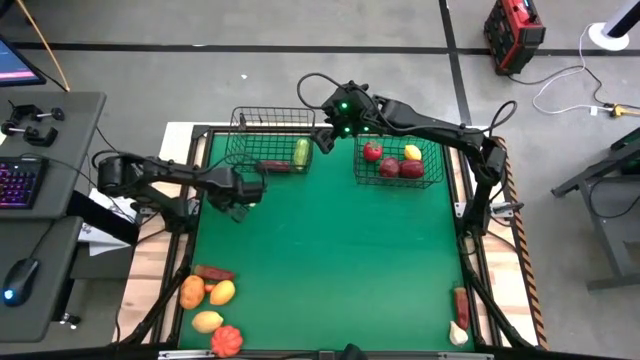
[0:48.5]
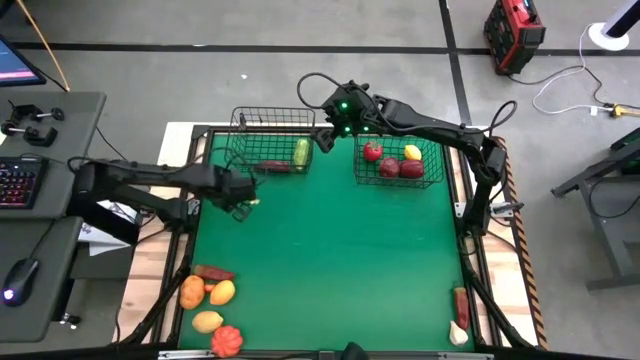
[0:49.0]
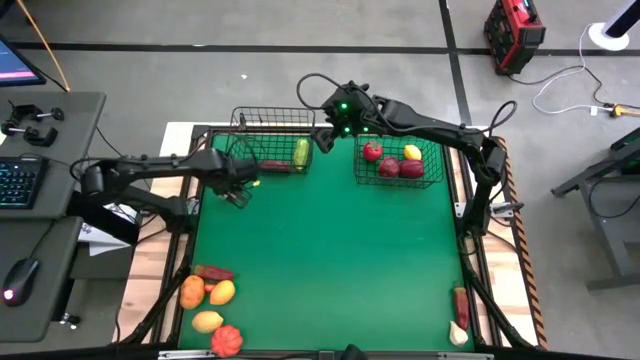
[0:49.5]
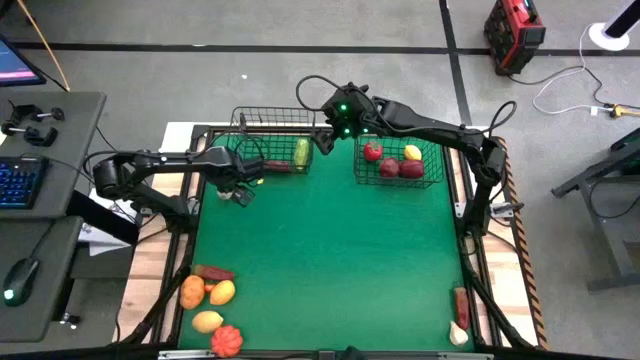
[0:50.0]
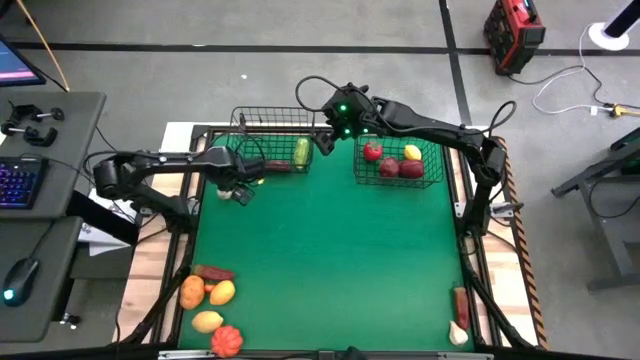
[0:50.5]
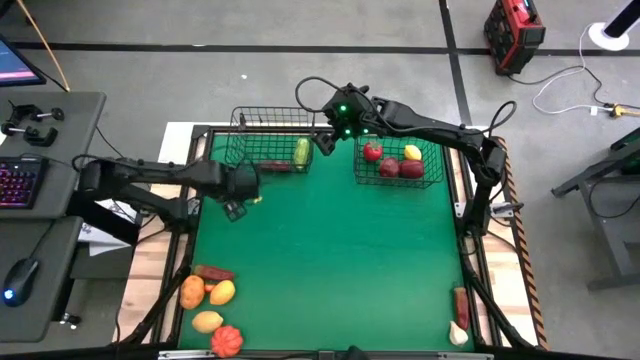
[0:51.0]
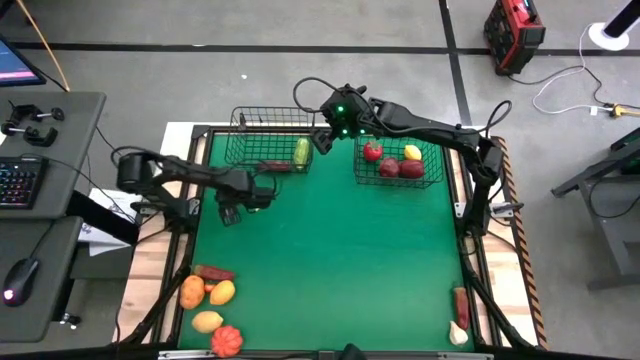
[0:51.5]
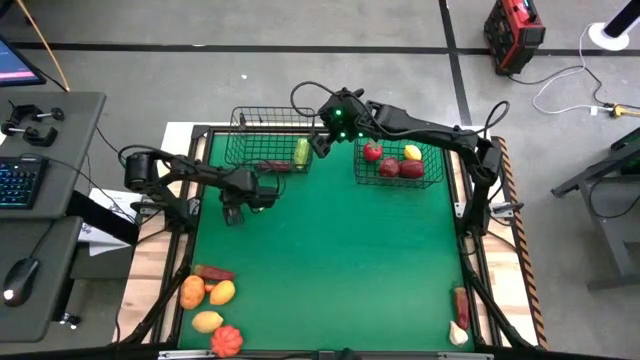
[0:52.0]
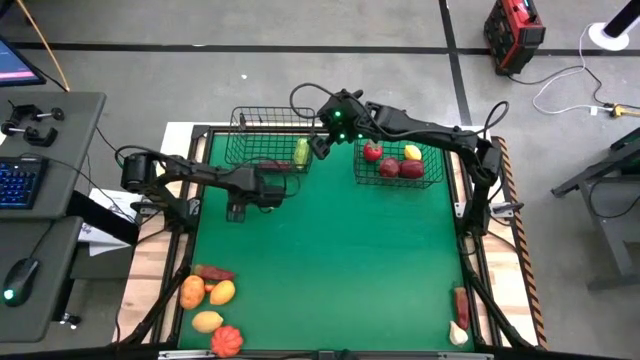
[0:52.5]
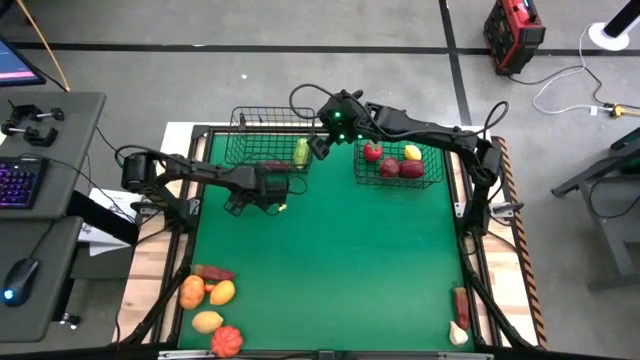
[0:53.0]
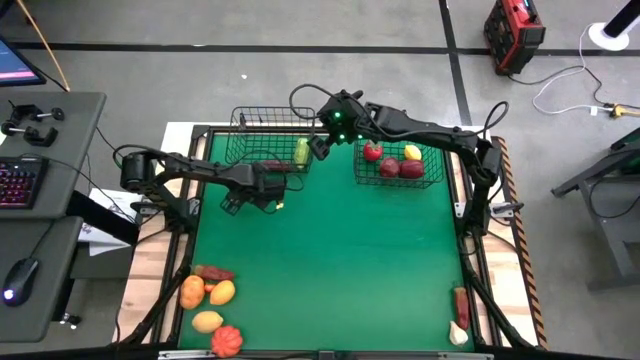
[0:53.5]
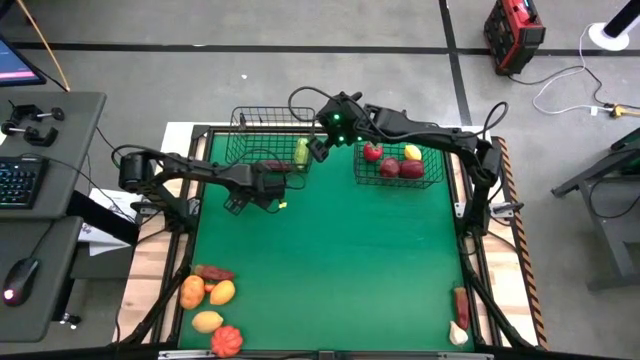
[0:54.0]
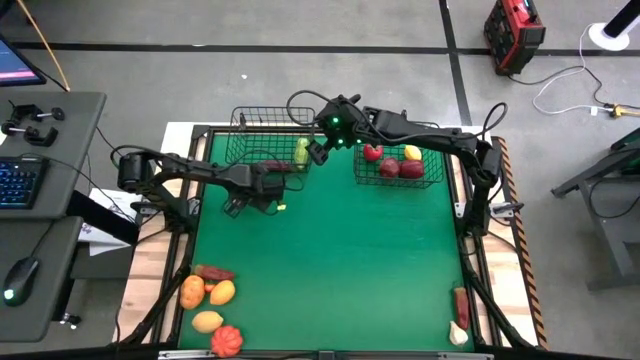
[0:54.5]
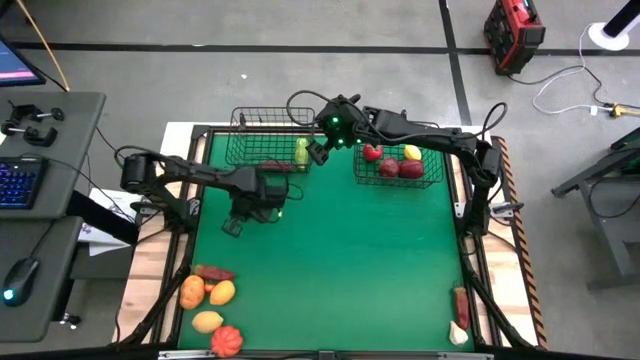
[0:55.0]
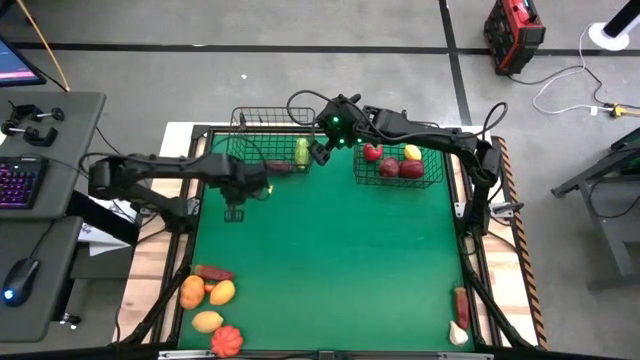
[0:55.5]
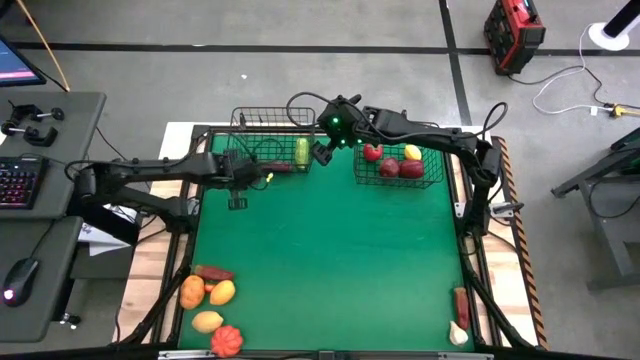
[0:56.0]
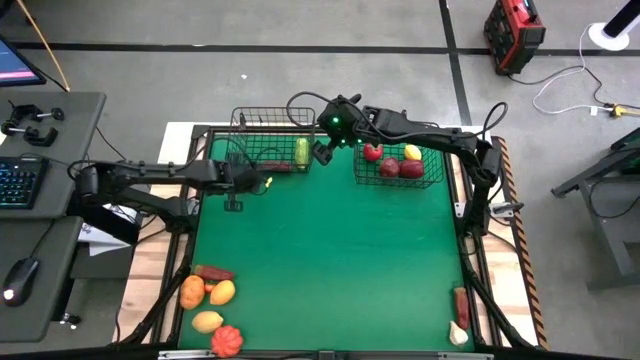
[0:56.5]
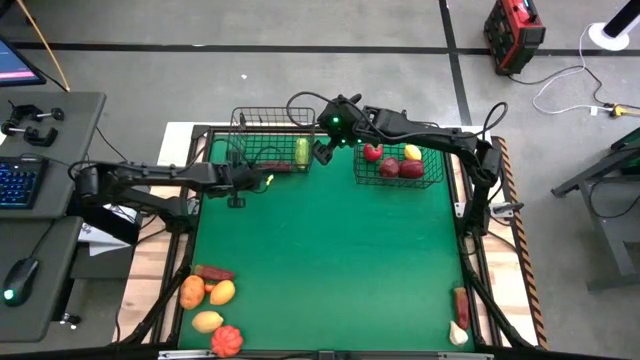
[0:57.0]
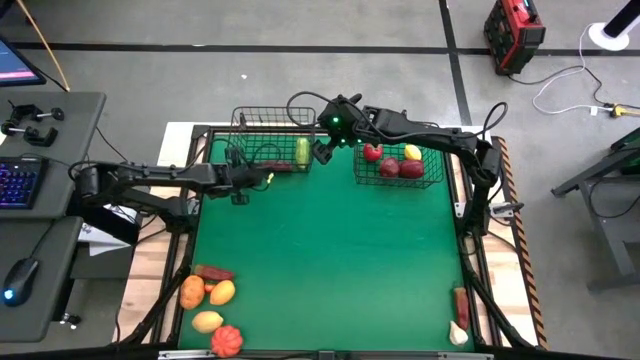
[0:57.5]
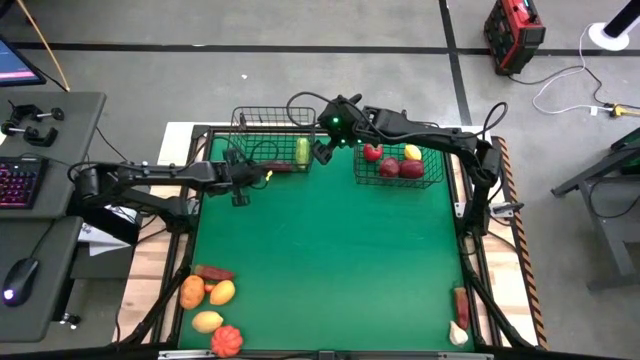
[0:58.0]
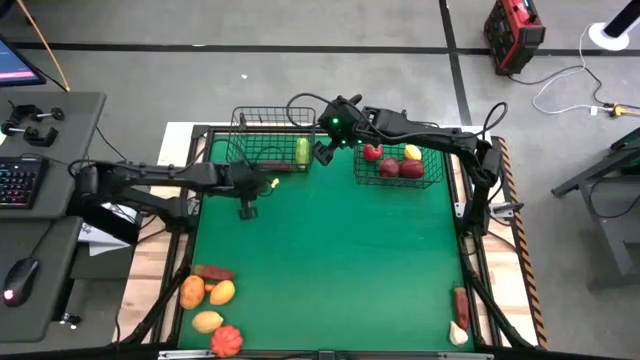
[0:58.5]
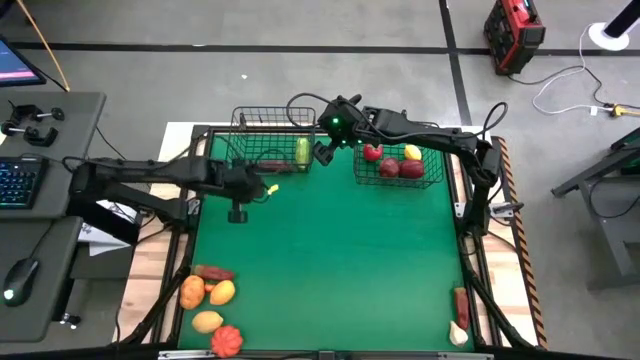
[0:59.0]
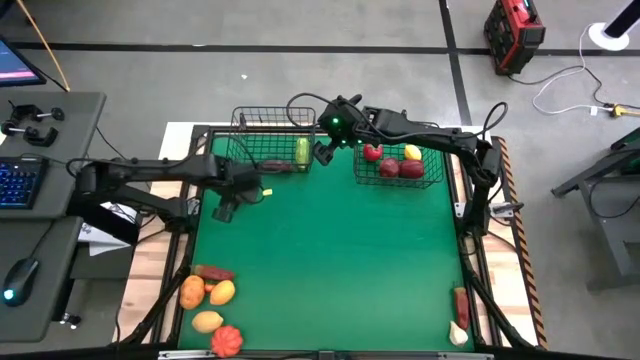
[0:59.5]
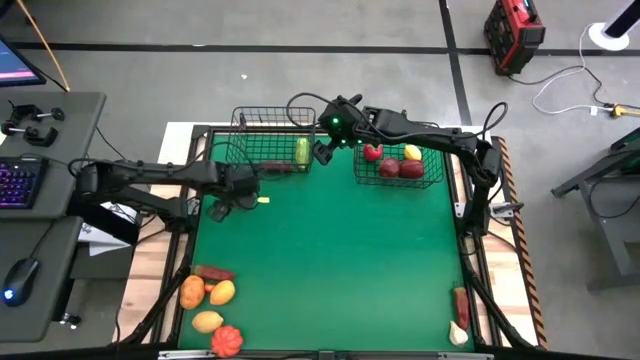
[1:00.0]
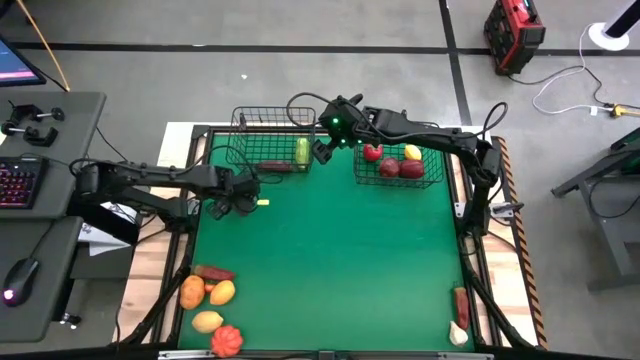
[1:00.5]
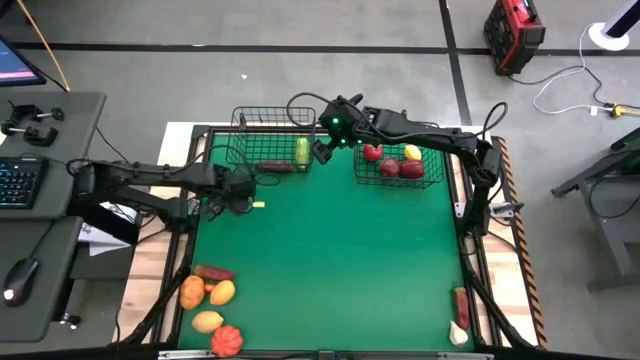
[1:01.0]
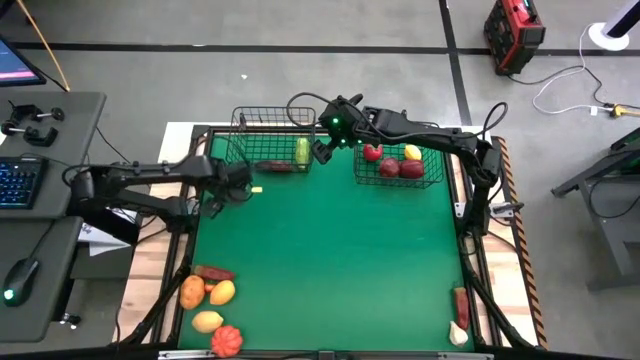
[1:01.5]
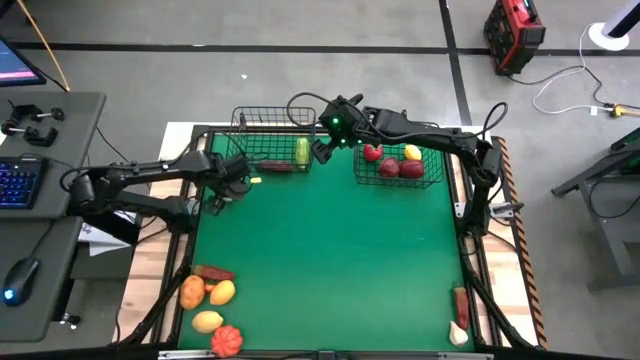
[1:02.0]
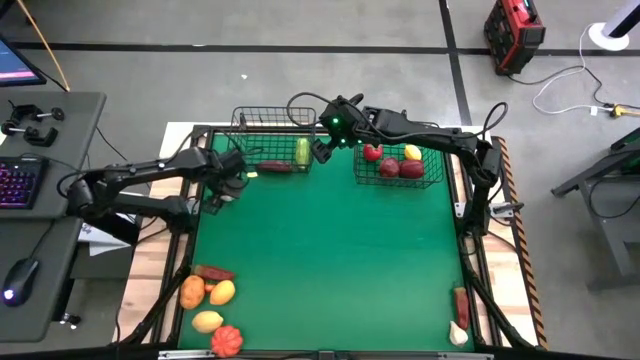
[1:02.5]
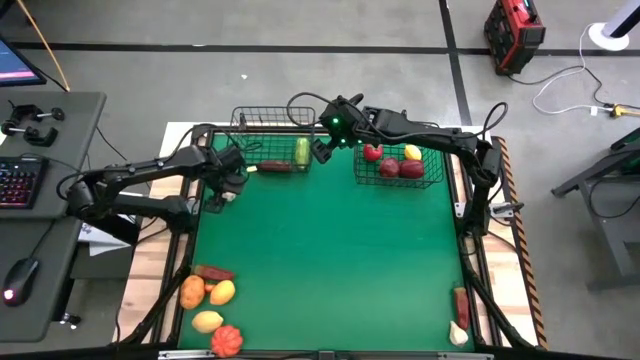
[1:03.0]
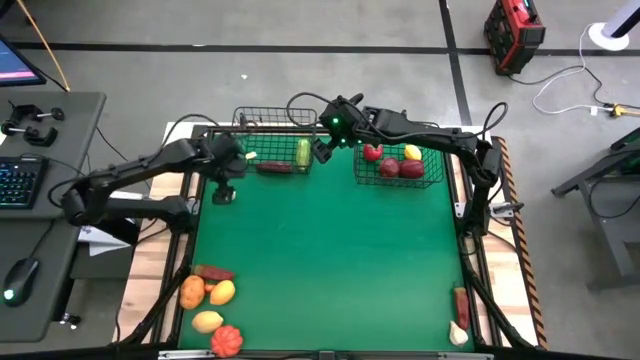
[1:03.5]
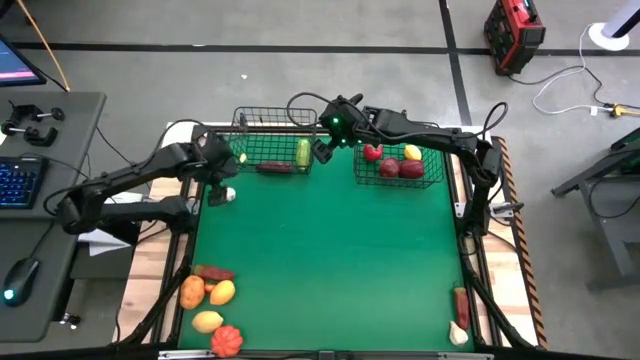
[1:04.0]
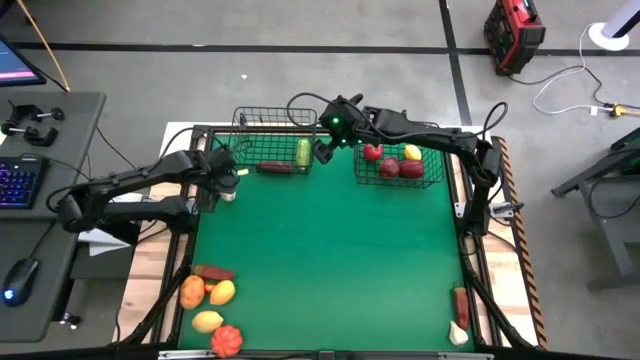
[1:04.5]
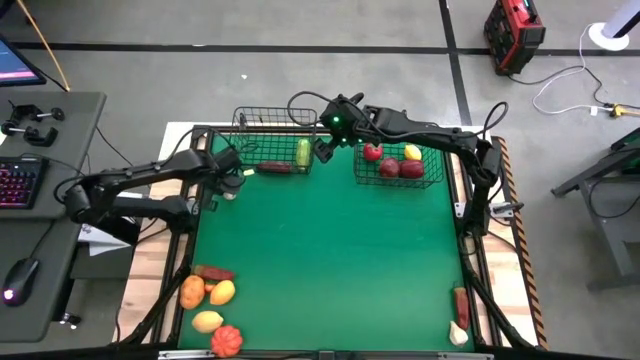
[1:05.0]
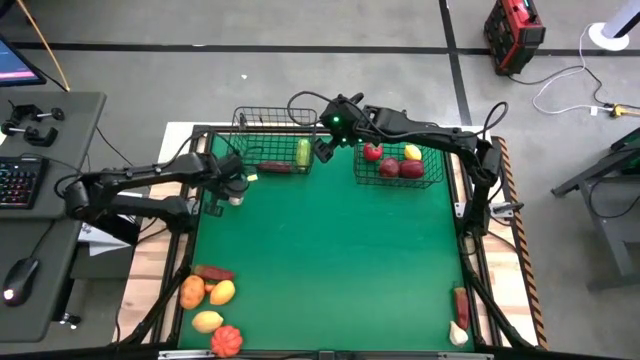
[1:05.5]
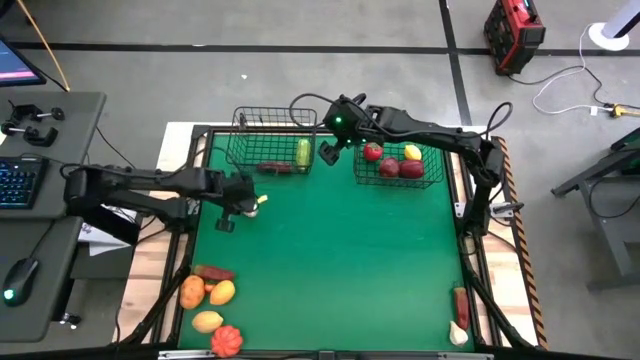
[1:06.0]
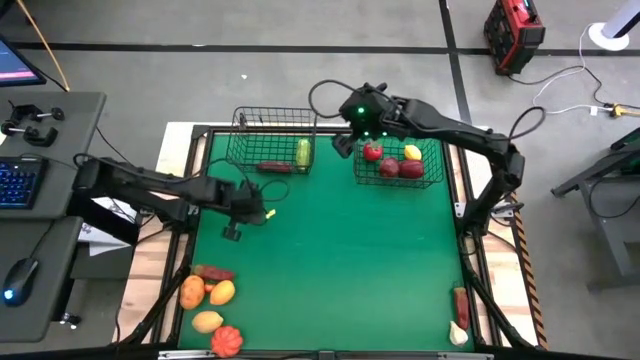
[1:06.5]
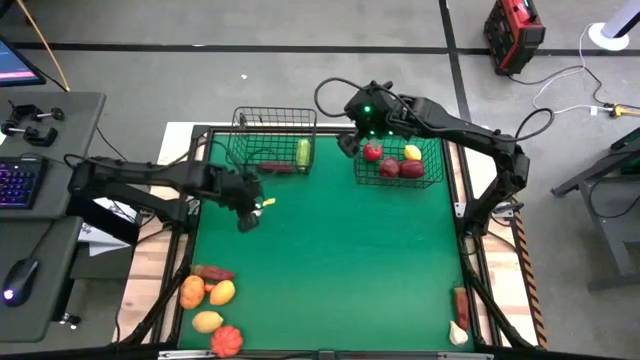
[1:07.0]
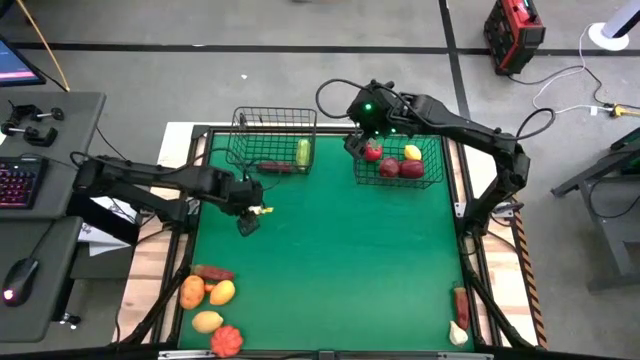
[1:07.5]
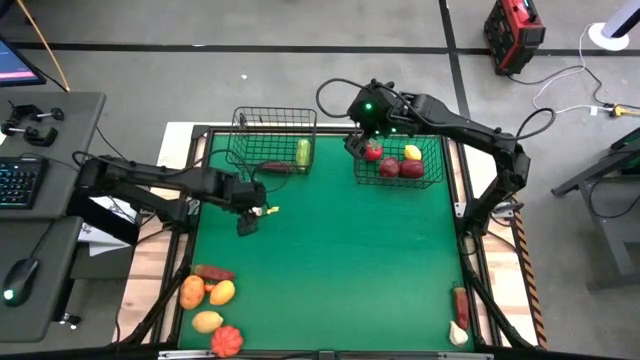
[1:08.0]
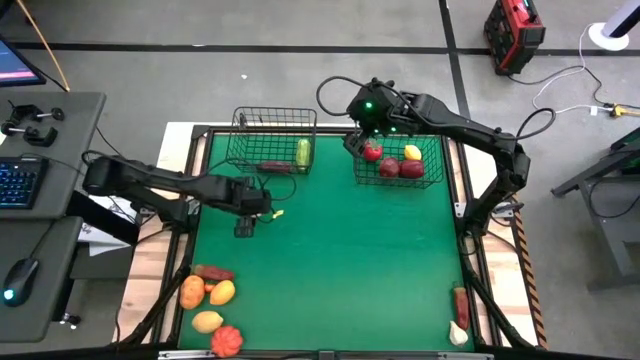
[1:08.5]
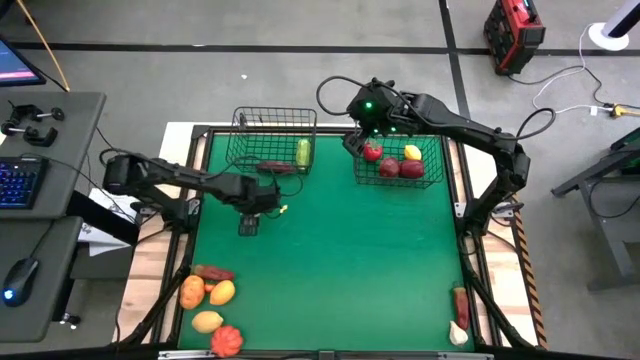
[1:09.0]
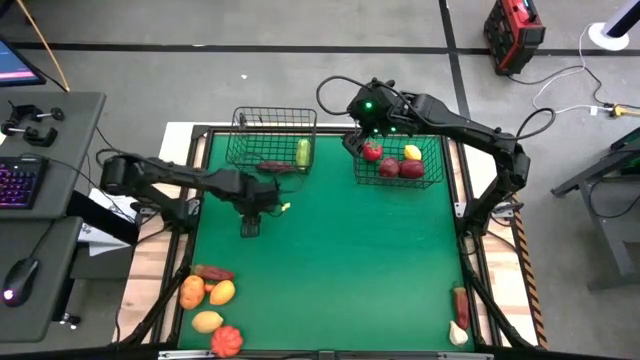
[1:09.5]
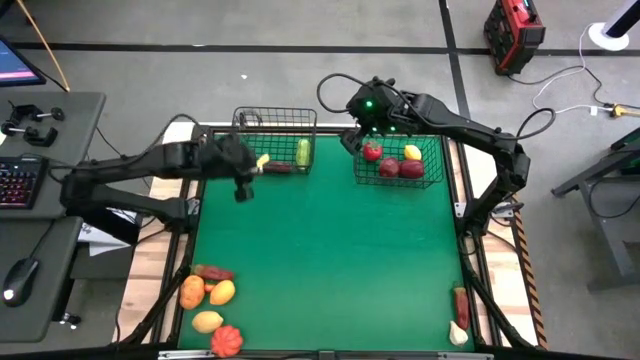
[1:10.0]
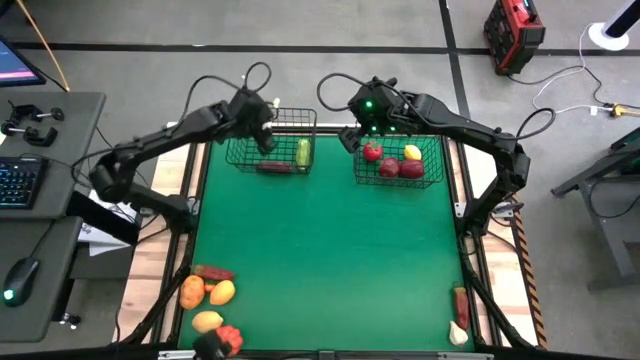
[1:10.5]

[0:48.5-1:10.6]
Task: Sort produce into baskets
Put the left white garlic into the left wire basket
